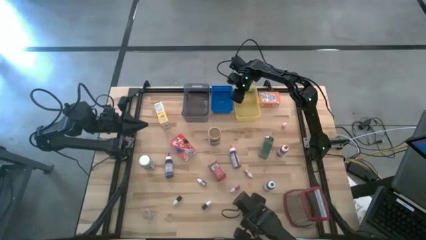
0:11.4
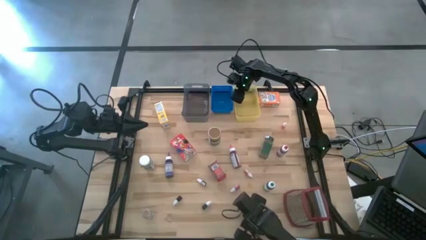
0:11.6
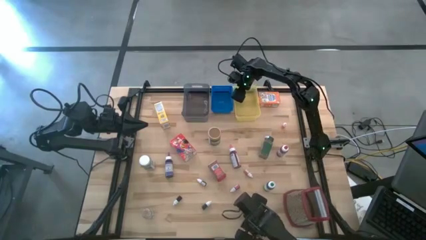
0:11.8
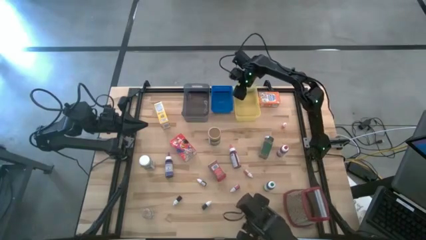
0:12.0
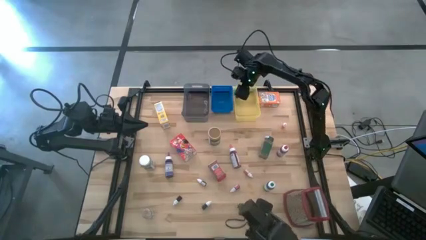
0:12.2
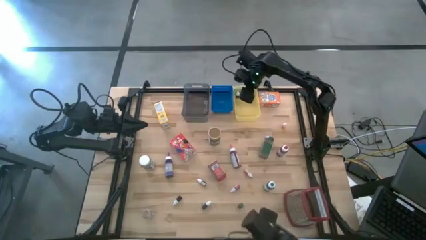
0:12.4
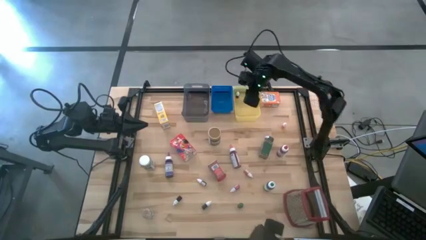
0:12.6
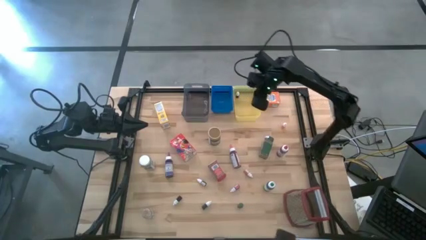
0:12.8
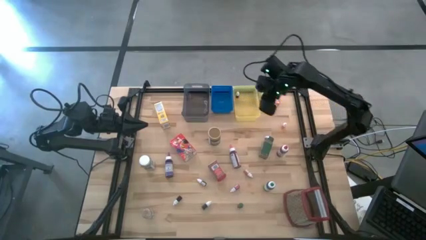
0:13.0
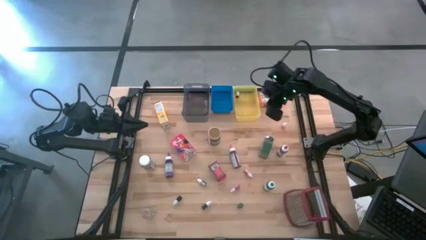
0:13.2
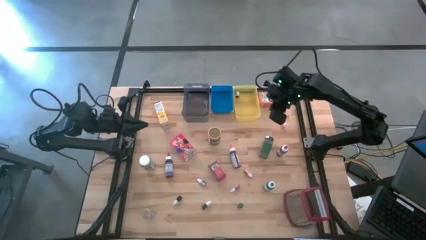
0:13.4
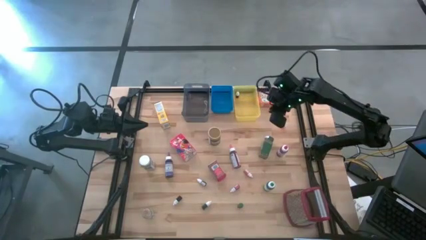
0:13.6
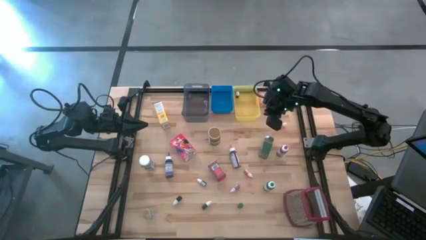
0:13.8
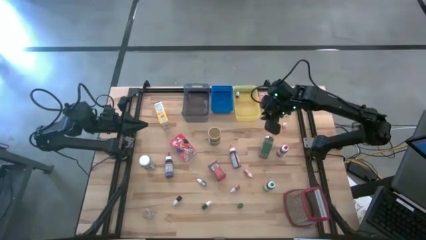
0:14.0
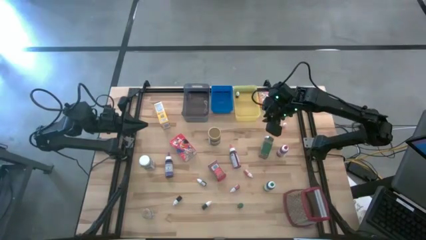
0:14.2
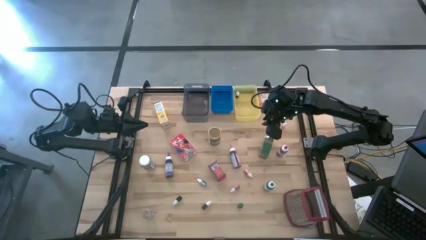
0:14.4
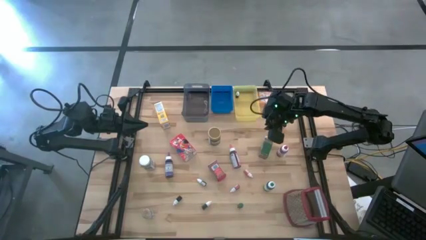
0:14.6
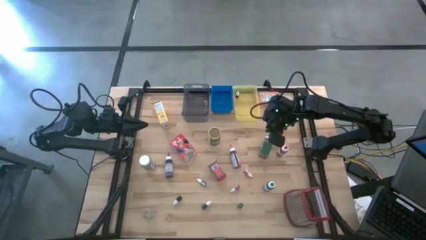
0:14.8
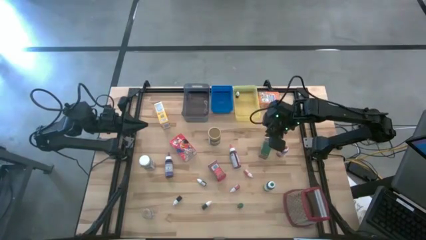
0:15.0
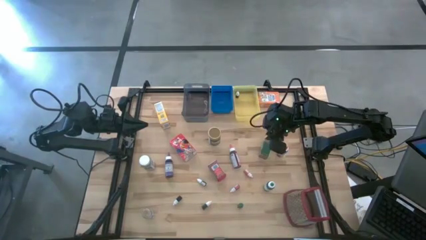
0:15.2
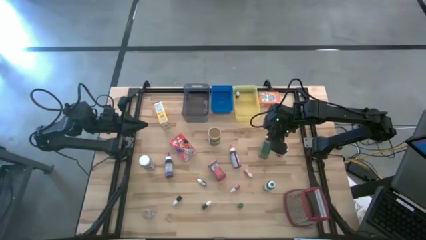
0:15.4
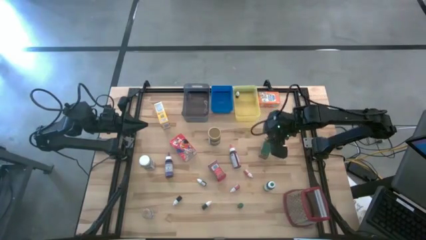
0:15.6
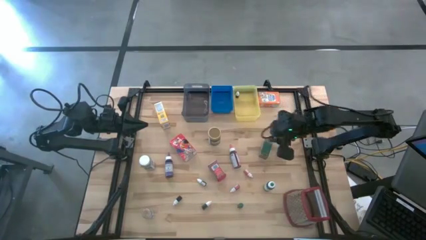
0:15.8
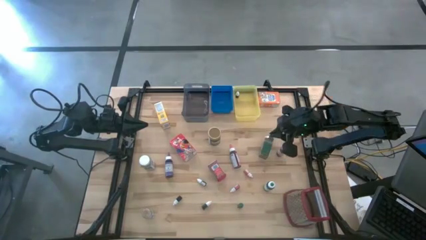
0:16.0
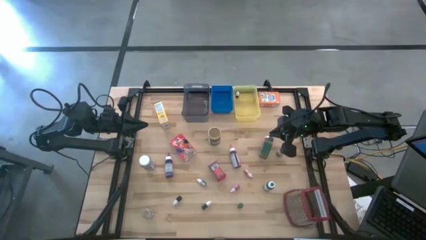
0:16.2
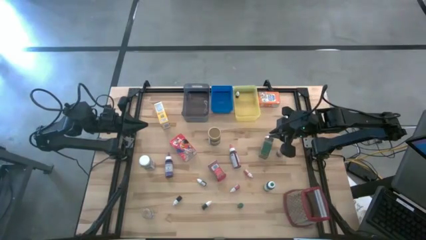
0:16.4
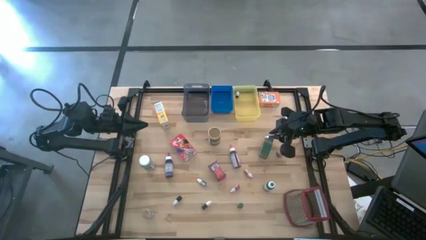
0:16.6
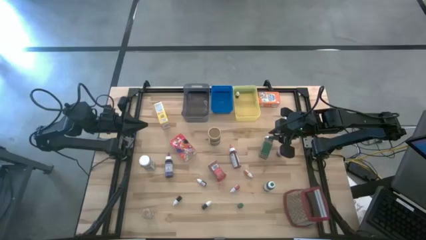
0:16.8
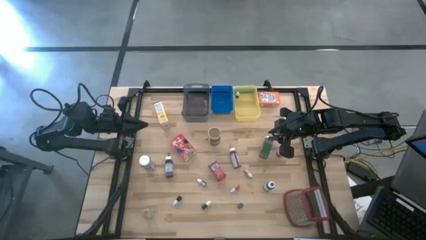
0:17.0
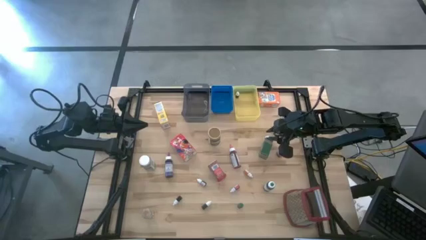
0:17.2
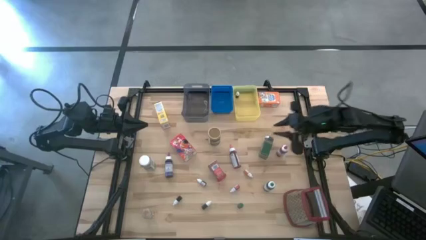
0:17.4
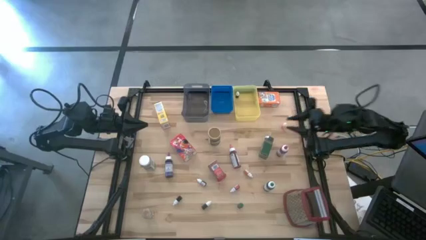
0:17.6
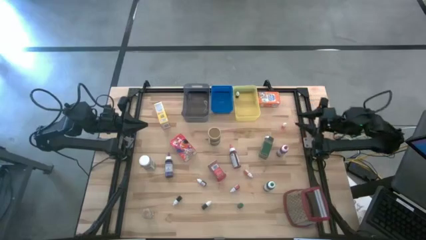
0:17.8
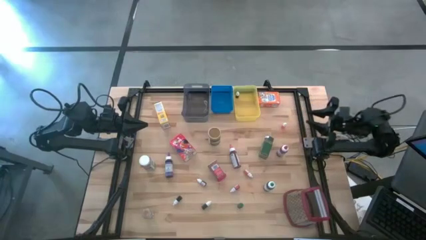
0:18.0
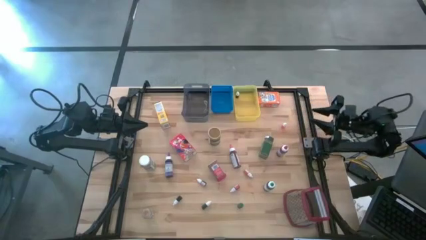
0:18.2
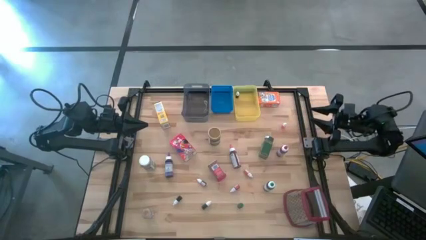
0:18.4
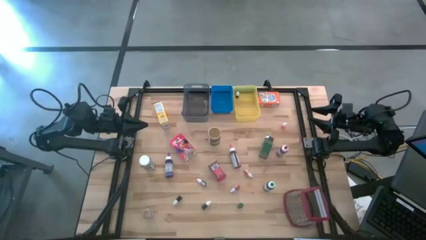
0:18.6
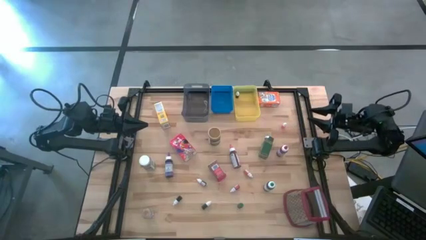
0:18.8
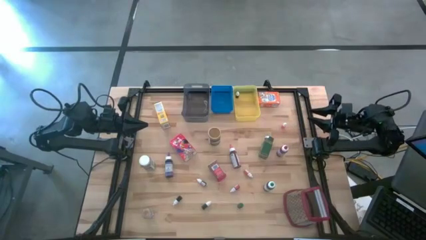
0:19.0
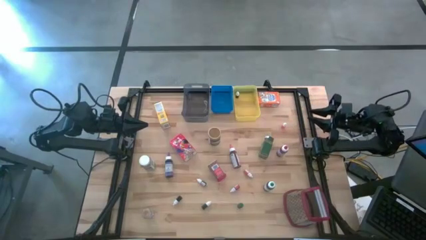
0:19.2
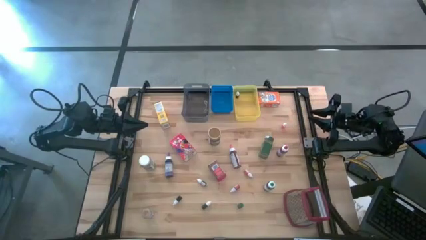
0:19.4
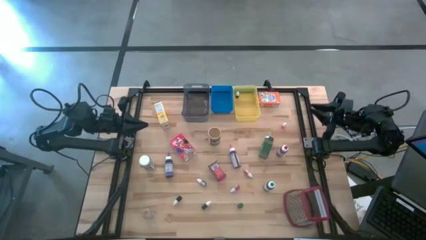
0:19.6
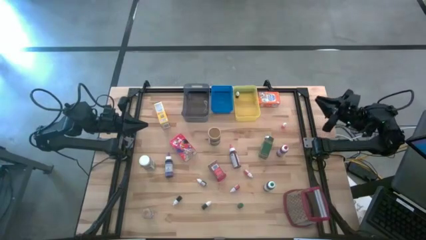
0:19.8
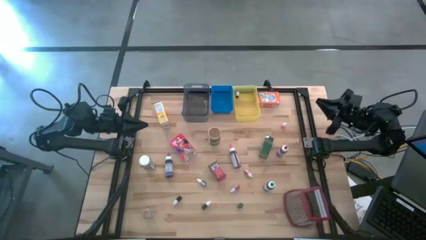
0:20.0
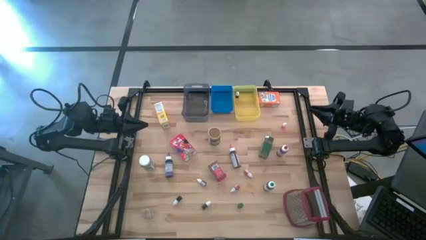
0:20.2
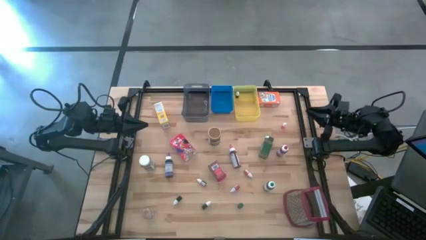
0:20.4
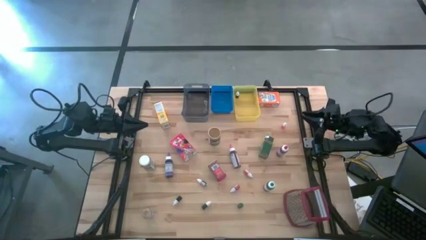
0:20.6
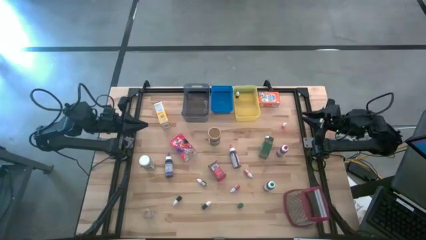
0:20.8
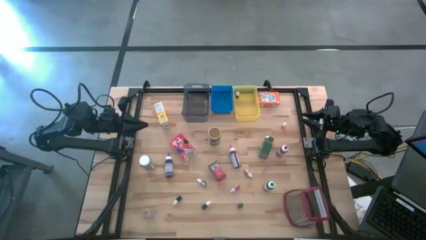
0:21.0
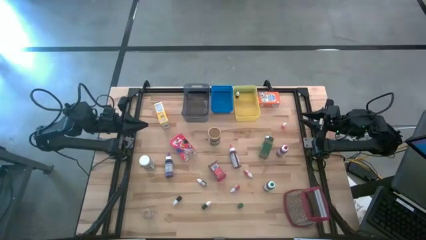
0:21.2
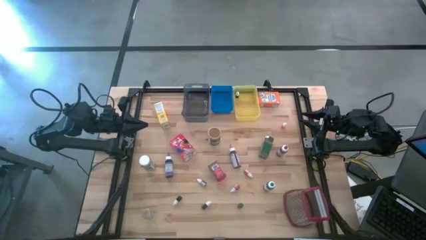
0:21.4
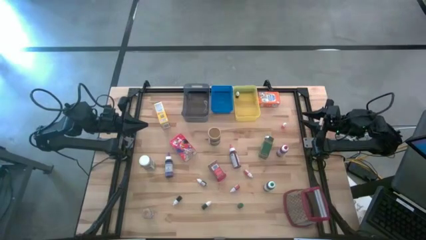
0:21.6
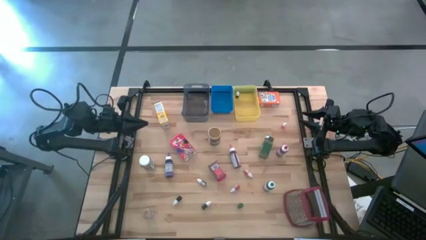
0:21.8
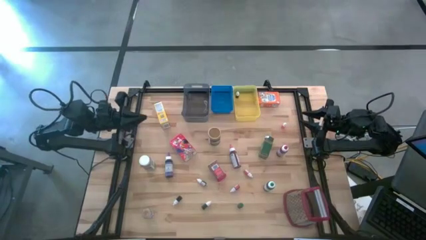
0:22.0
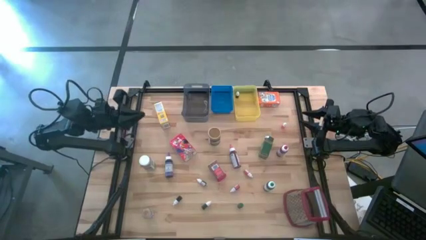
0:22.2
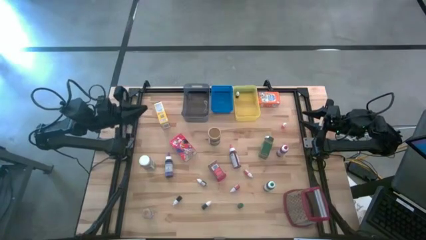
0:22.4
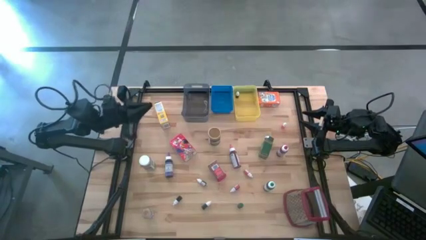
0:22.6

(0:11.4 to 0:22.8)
Task: Pick & Place Kitchen Items
Put the gold spice bottle into the black bin

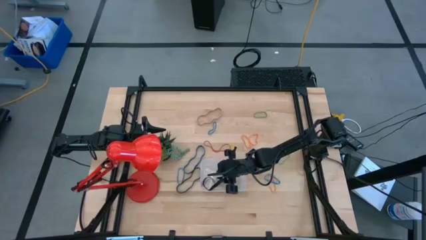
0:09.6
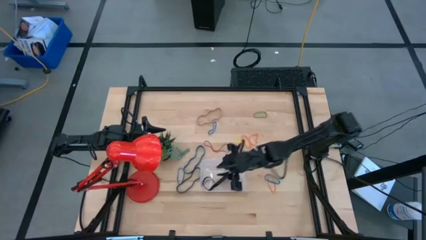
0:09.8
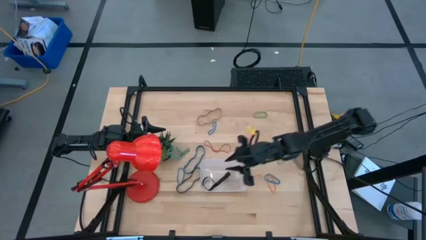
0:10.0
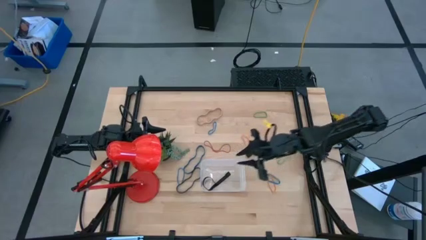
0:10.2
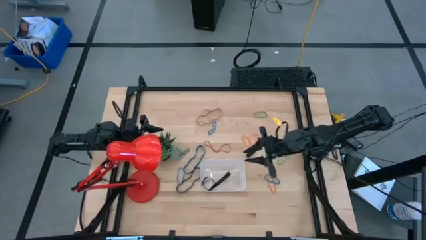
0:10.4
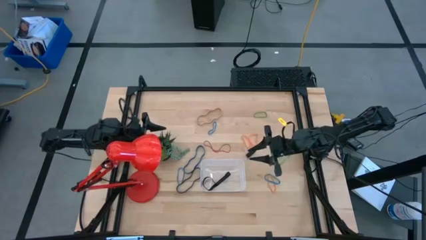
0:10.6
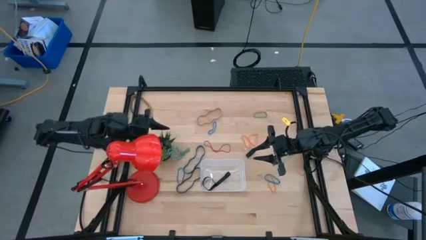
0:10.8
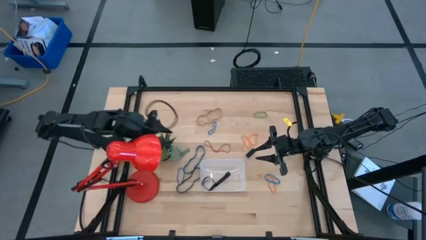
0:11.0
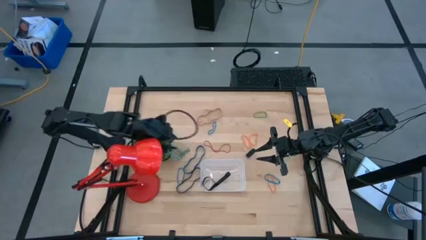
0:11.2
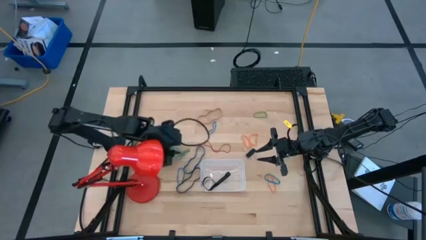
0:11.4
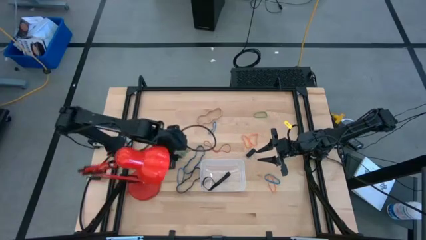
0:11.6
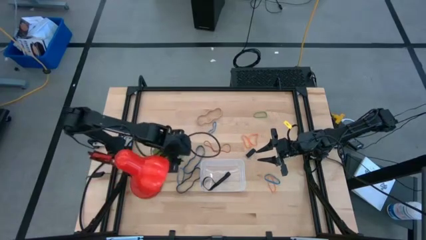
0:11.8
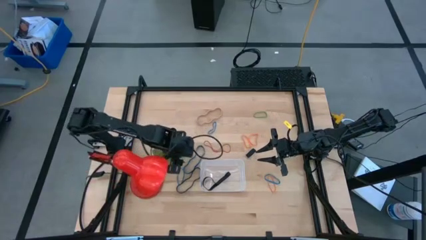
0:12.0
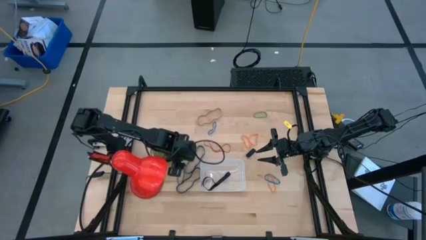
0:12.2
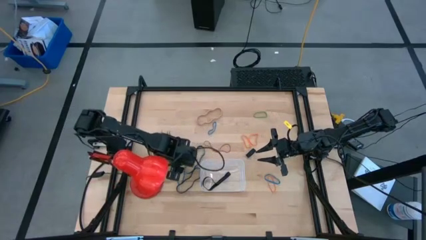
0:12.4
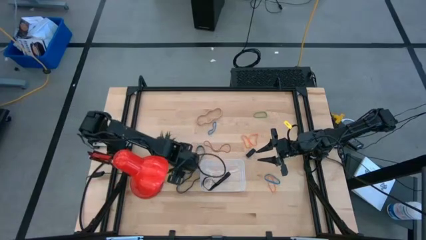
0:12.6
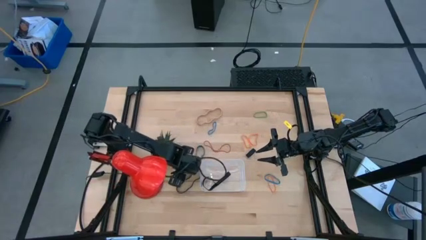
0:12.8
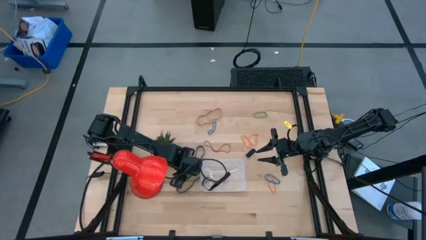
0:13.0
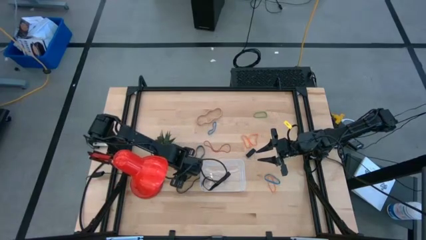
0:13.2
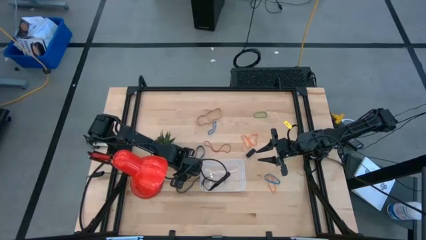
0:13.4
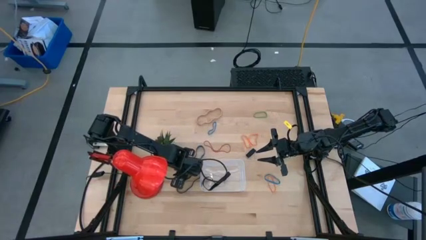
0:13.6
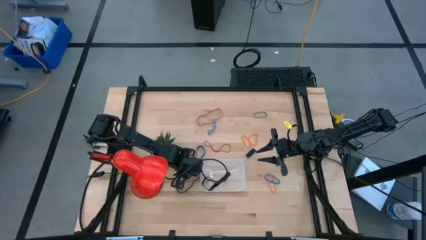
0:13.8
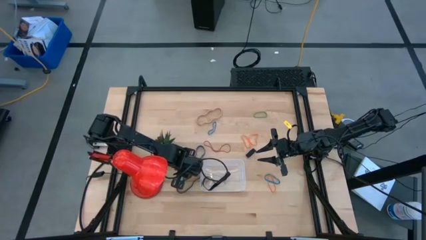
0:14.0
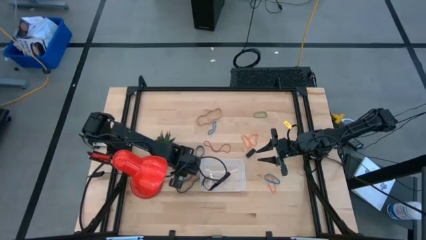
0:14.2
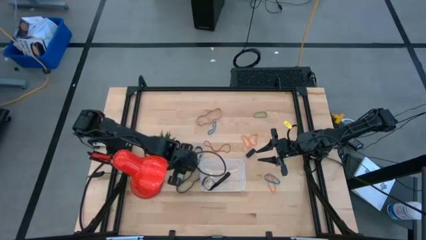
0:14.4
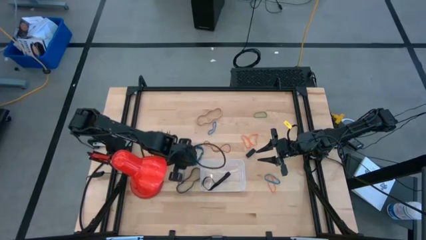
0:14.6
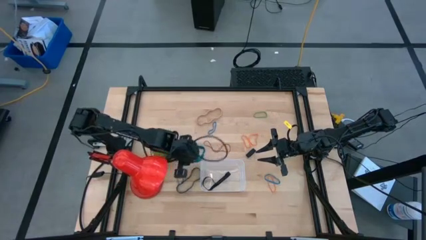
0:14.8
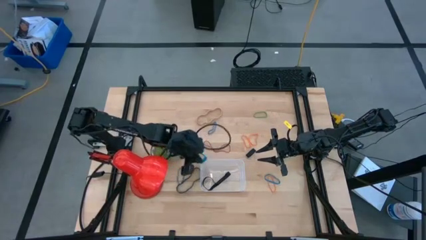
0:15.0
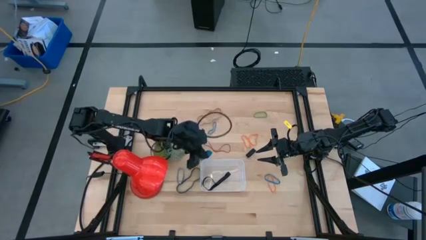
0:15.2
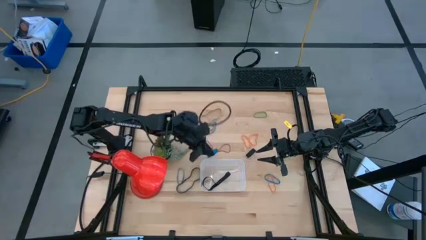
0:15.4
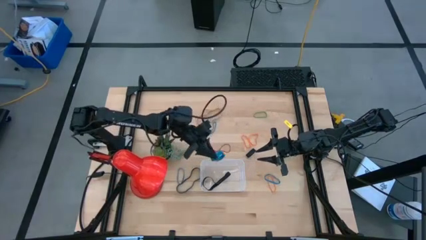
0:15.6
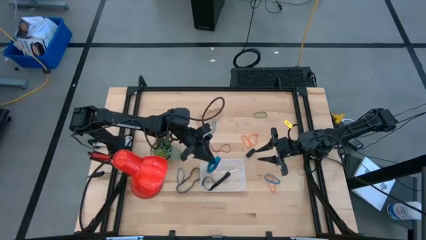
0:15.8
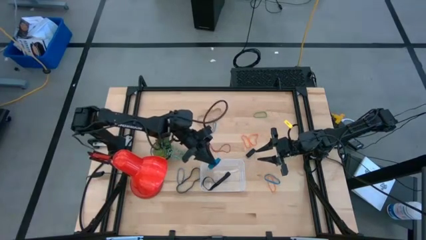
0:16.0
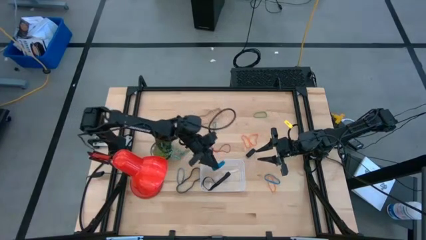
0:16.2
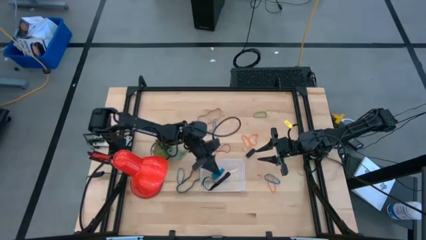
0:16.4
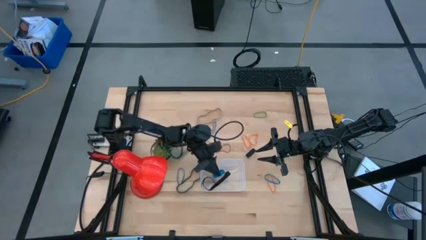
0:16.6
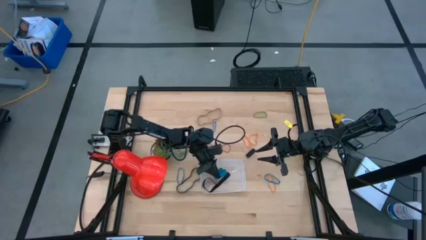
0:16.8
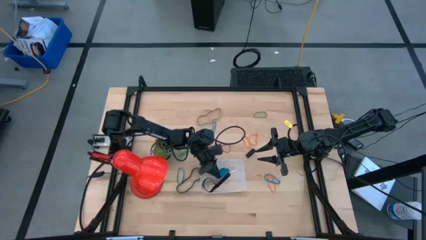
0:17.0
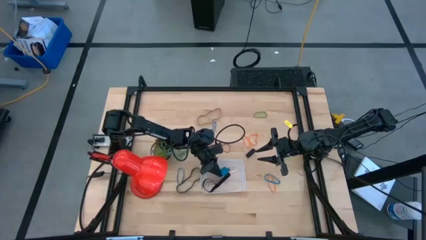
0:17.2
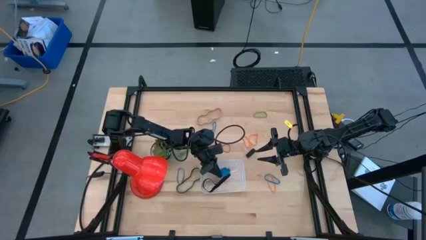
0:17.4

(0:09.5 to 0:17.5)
Task: Pick and place rubber bands into bin
Put the blue rubber band into the bin
